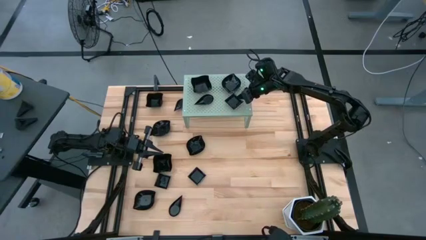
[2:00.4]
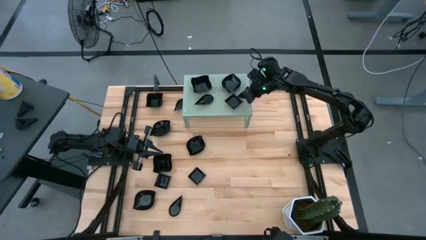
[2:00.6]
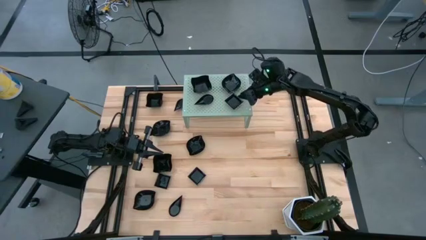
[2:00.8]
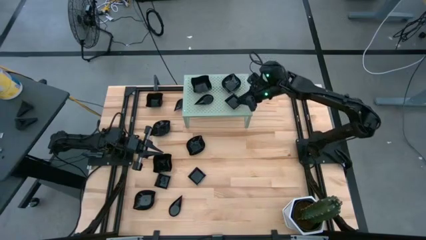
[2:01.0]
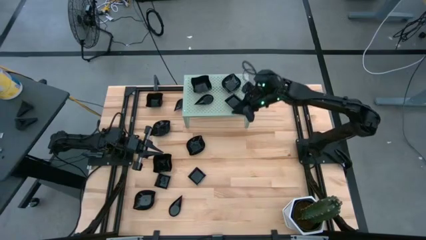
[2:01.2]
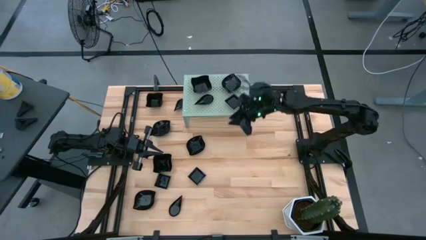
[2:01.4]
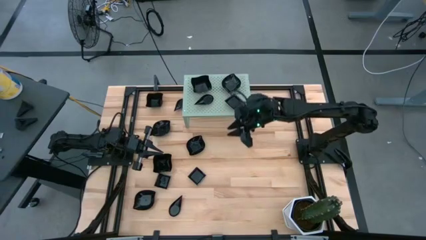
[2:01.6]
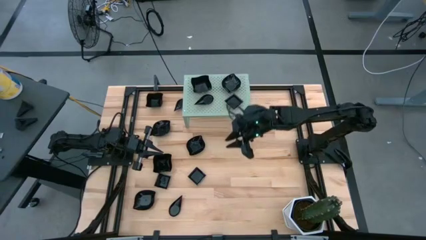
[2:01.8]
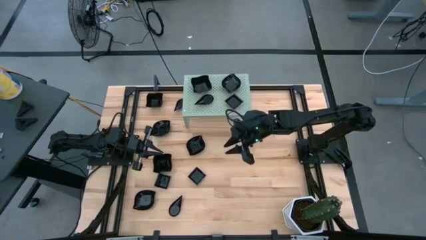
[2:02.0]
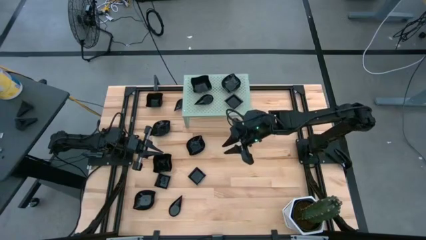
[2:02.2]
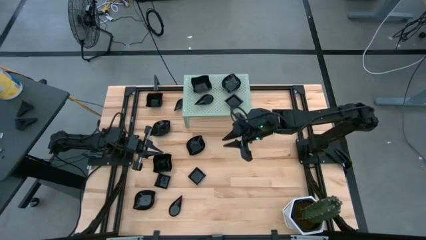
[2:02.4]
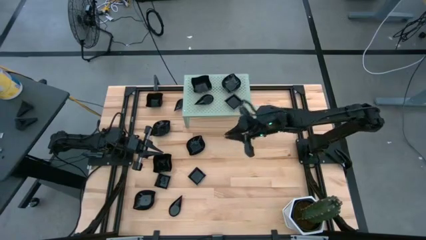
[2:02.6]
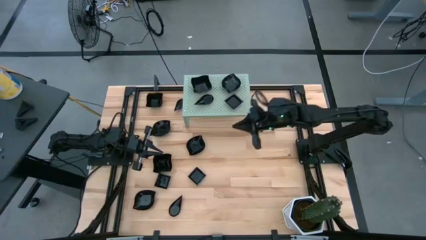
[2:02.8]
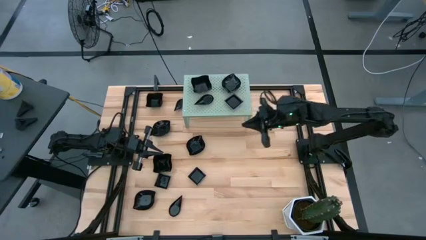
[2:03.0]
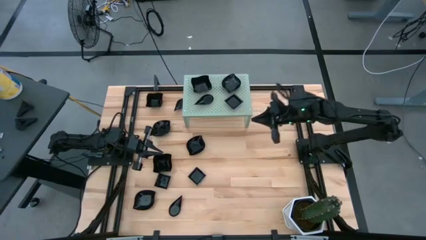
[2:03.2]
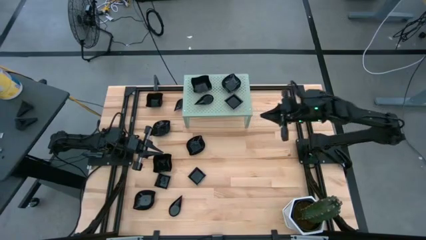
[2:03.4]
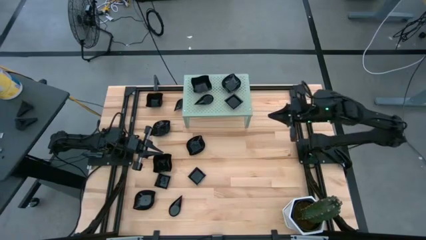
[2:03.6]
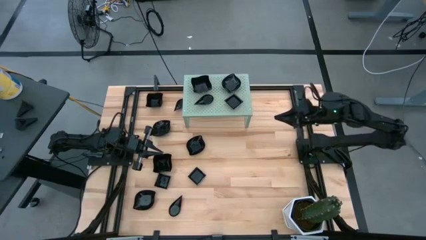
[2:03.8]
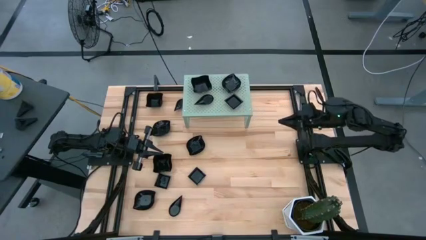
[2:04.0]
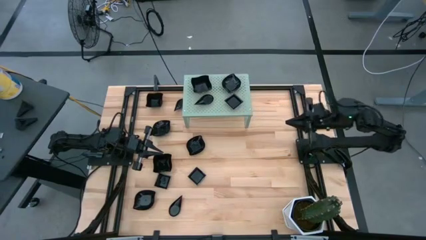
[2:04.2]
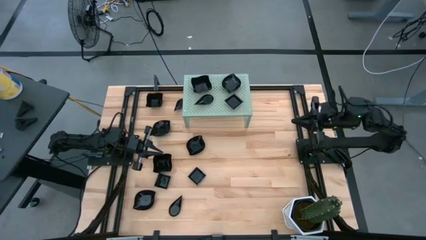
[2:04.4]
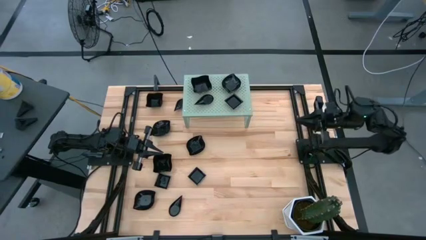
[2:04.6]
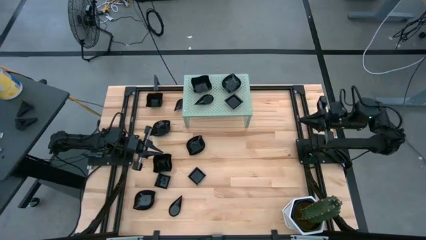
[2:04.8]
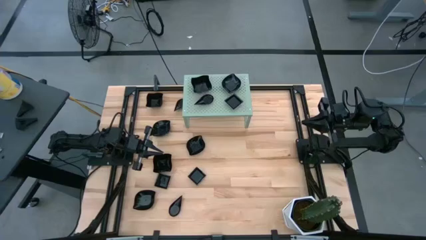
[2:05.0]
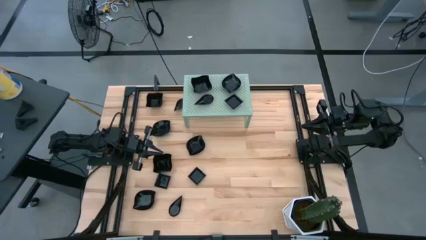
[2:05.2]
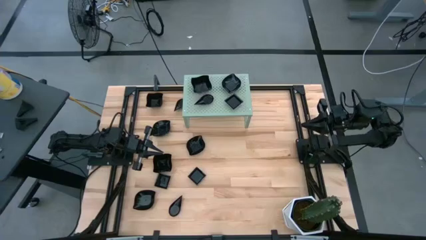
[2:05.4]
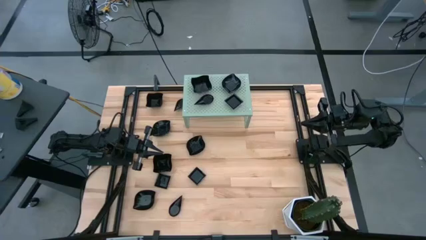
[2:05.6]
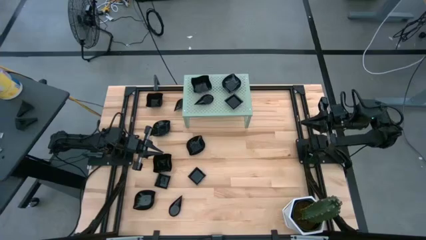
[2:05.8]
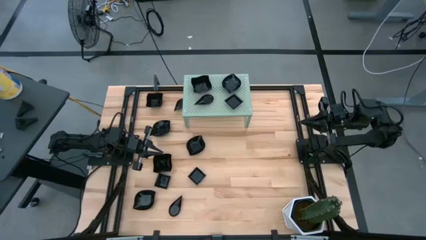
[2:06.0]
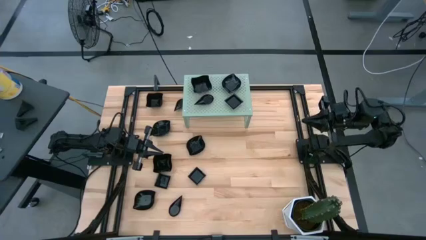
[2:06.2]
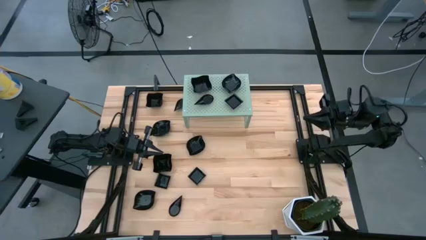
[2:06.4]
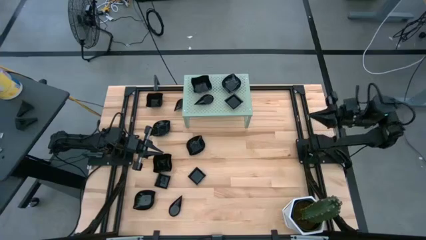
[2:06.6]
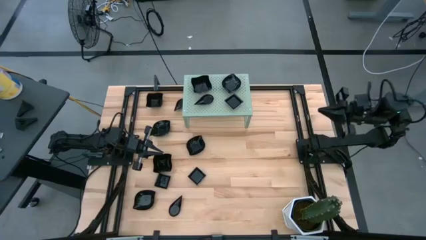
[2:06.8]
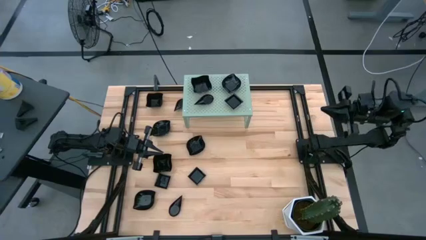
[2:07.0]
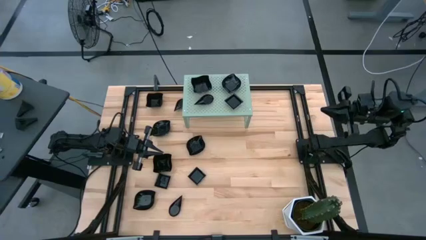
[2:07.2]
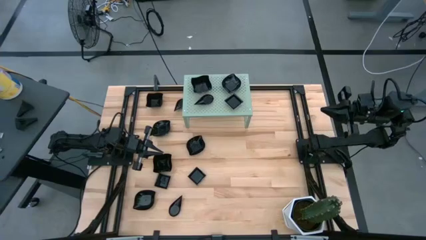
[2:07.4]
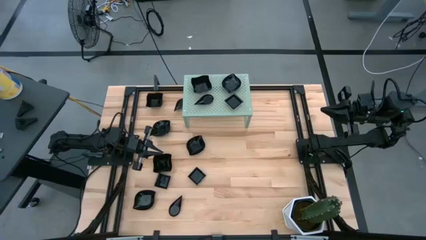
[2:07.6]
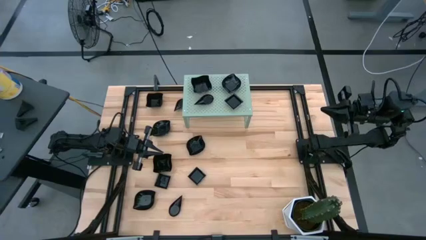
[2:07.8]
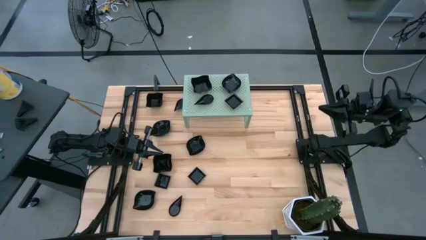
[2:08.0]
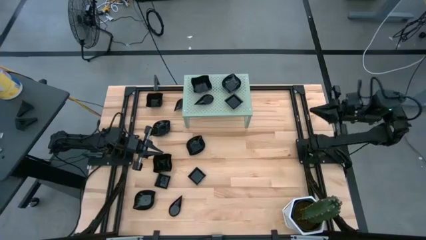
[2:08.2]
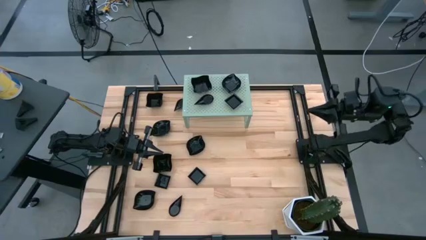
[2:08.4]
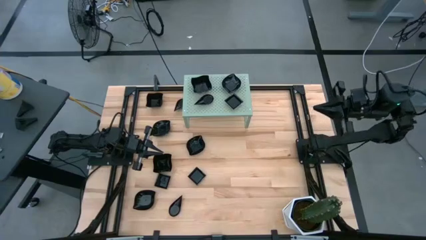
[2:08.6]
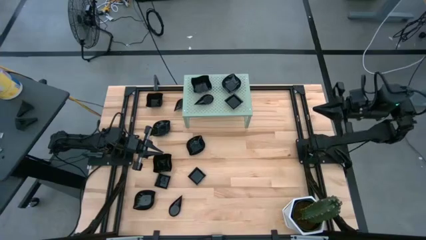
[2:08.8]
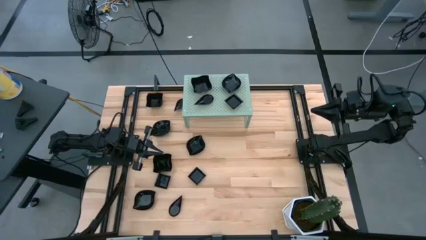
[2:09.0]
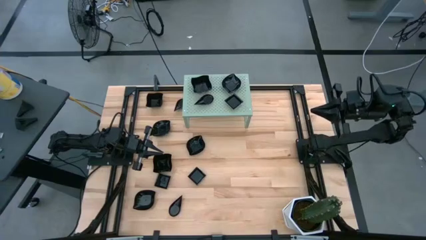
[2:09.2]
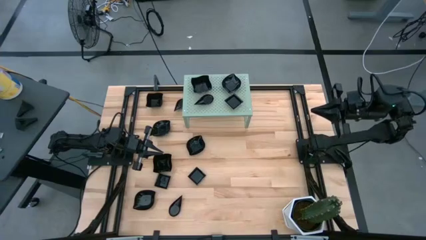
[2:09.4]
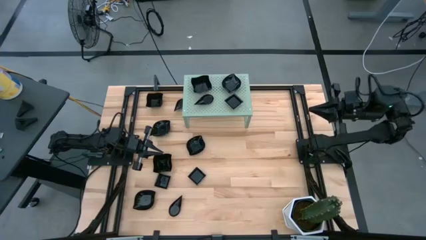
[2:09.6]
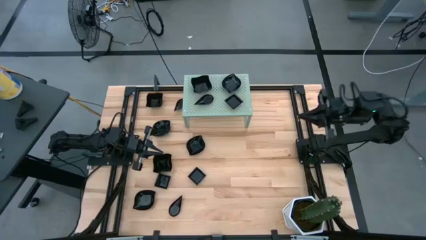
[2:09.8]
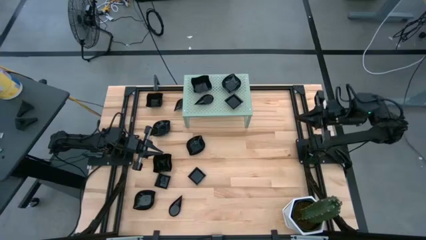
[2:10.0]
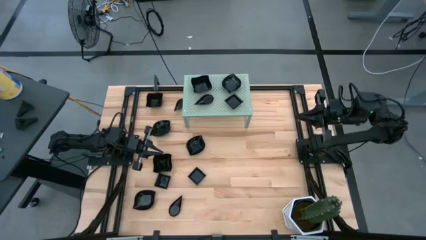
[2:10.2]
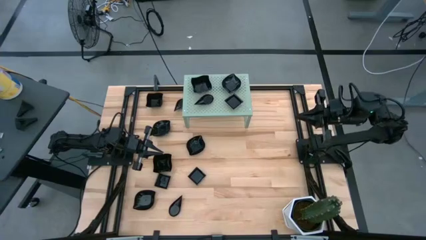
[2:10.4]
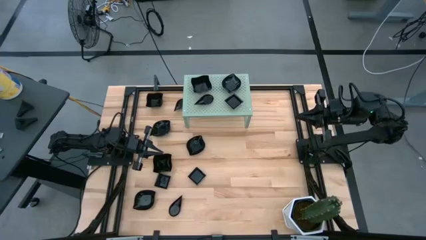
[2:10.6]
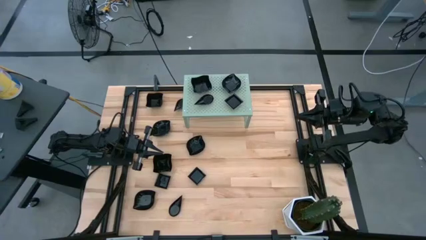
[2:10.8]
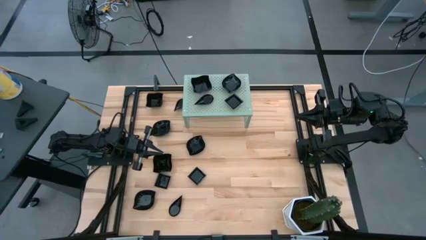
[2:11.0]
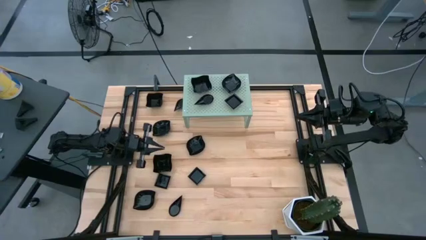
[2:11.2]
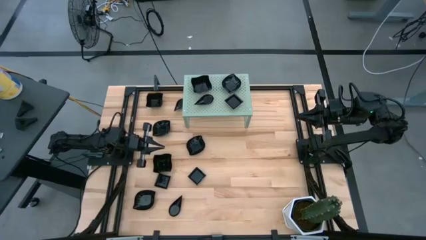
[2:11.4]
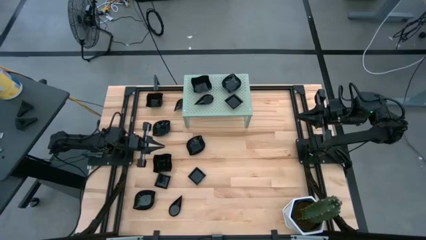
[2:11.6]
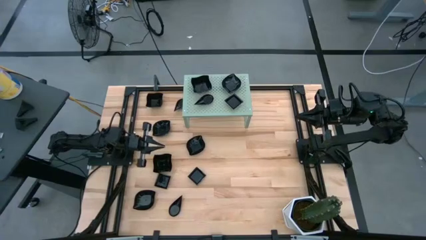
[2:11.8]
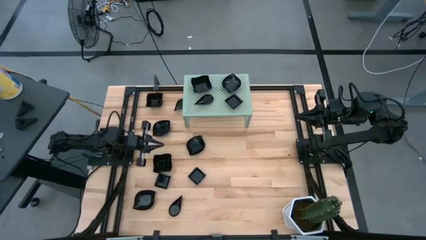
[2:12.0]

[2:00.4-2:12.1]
Task: Pick & Place Mini shaped plates
Stack the distorted square plate on top of the distorted square plate on the shelf

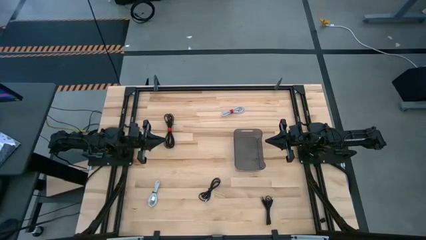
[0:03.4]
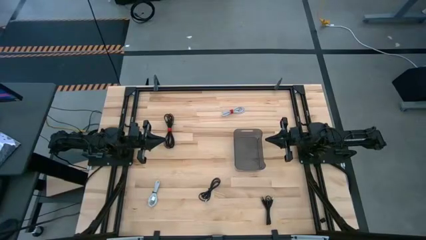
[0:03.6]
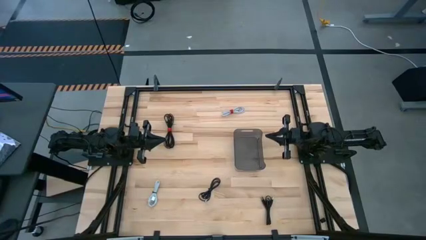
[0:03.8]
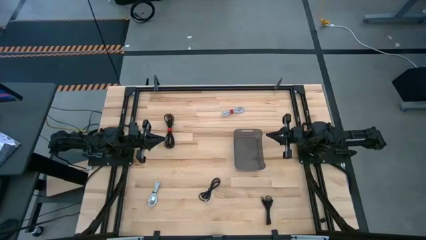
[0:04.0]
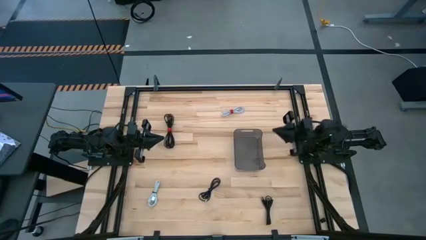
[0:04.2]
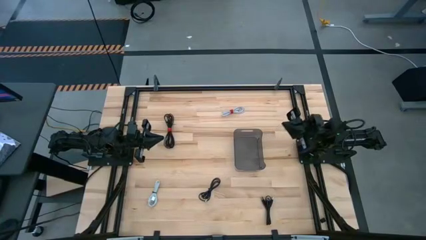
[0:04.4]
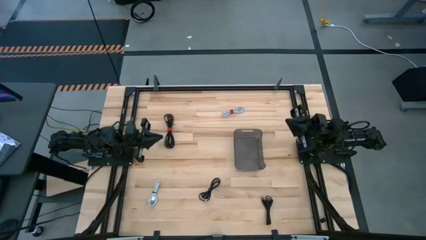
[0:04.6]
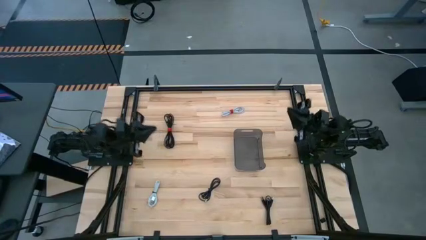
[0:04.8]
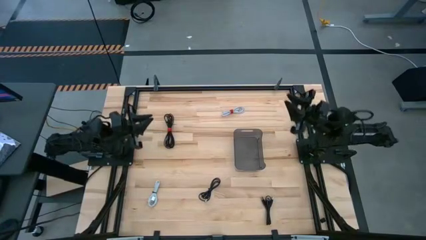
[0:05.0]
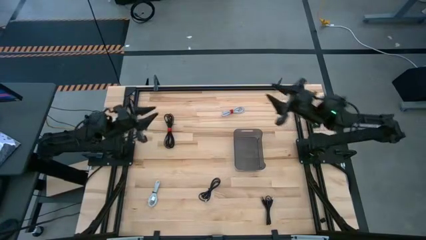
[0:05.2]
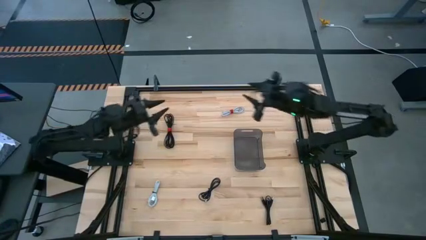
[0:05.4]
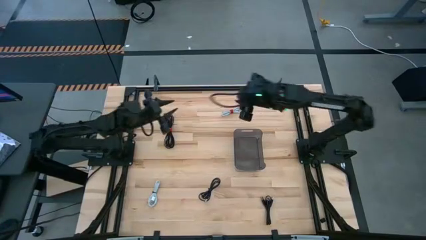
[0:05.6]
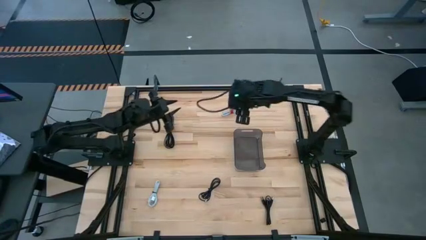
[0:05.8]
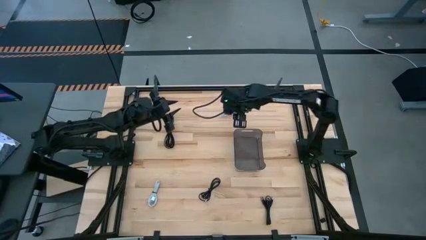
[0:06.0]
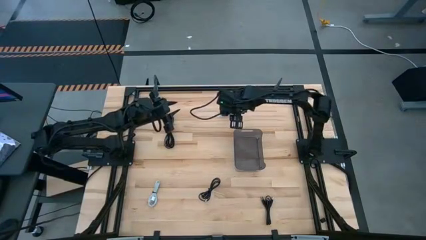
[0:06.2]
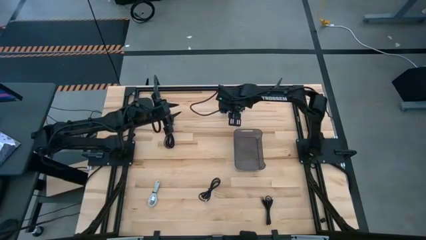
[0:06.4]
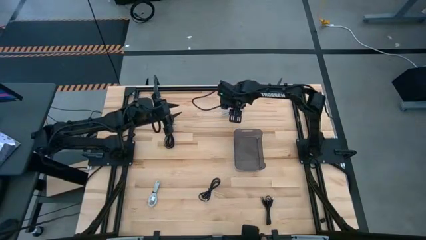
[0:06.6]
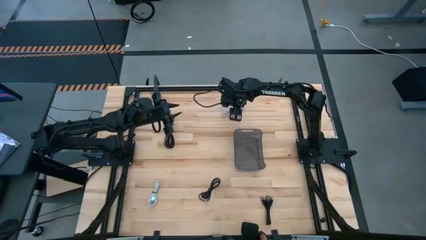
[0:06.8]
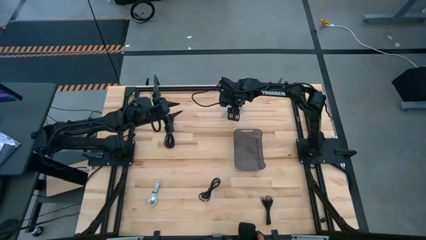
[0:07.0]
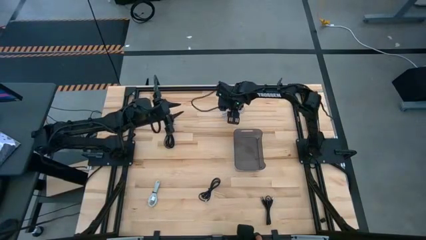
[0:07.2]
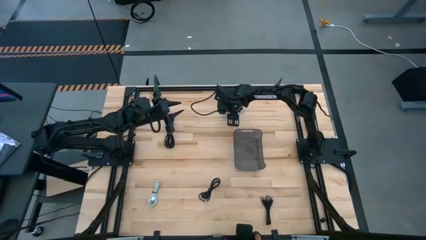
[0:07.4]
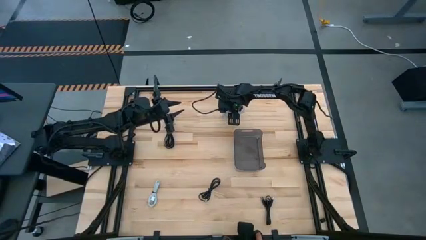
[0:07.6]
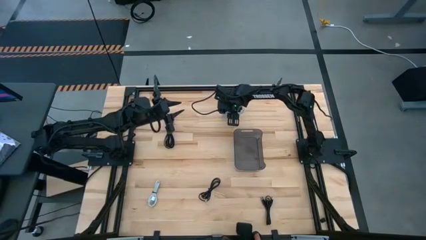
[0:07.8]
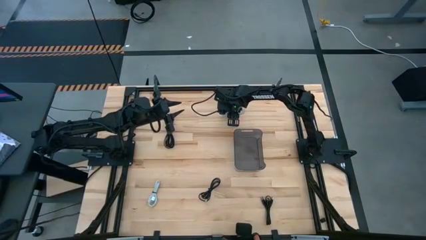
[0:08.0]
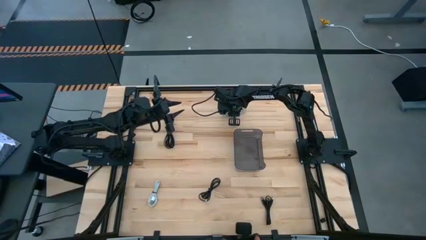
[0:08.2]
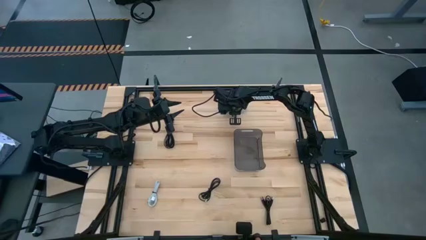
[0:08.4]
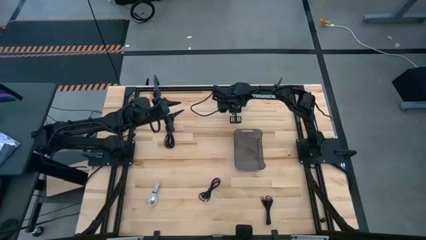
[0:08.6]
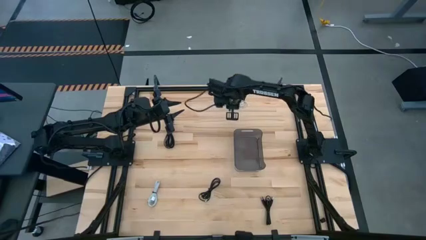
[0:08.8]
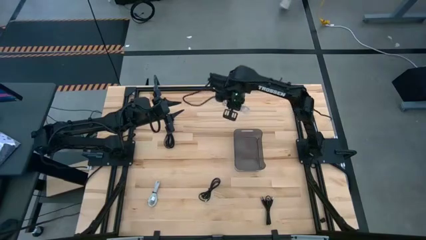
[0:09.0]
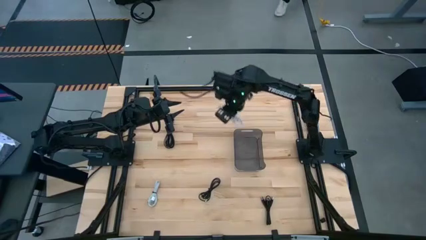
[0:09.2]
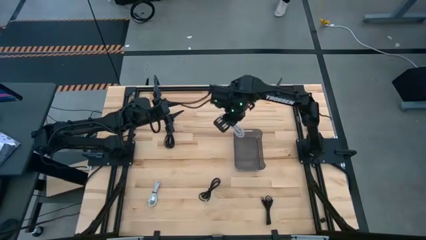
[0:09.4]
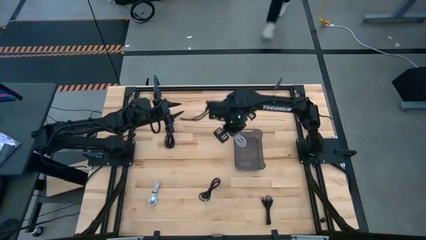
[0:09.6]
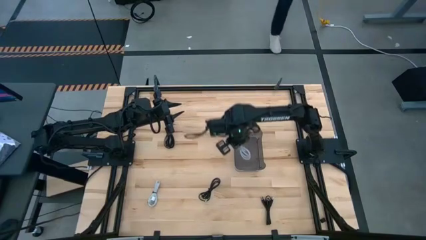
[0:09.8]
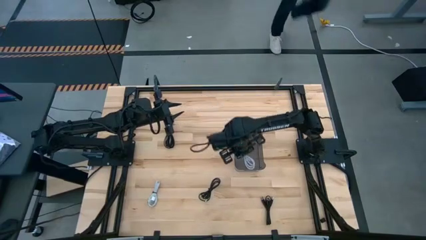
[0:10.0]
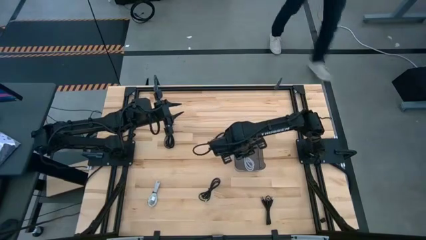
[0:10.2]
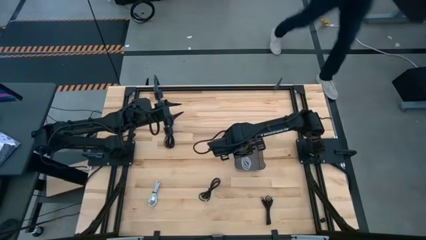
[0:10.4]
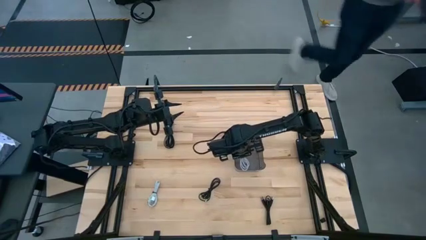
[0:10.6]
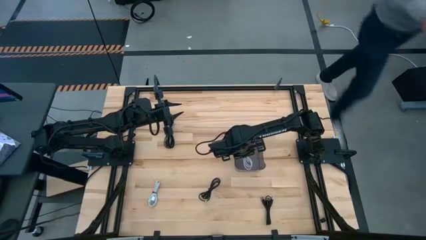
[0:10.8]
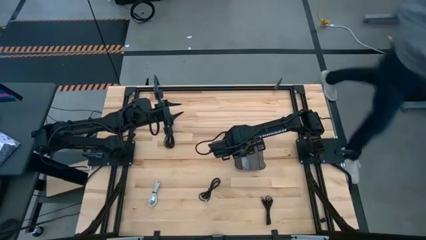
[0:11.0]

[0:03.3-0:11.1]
Task: Pick and place USB-C Cables
Put the top white charger cable into the black bin
